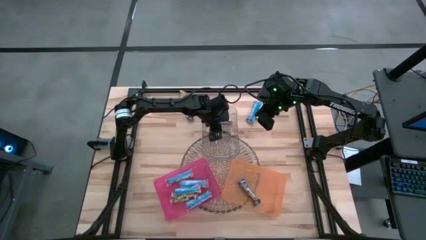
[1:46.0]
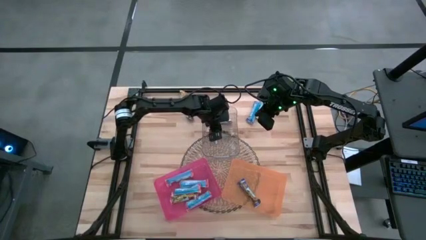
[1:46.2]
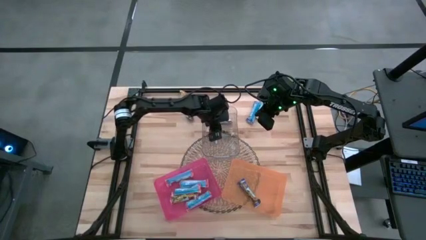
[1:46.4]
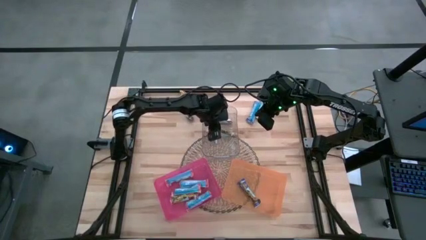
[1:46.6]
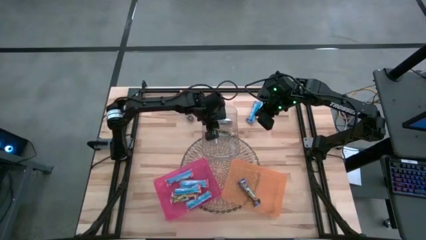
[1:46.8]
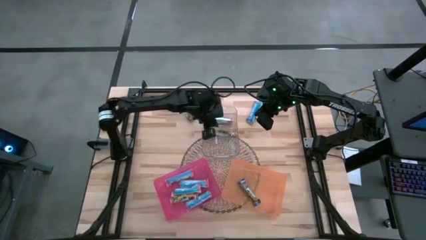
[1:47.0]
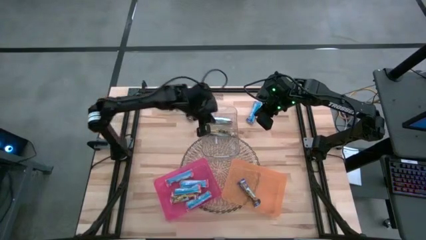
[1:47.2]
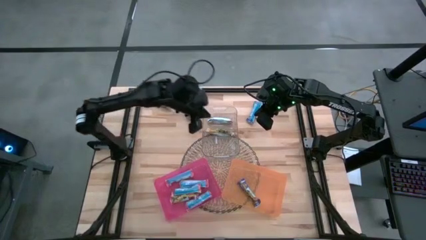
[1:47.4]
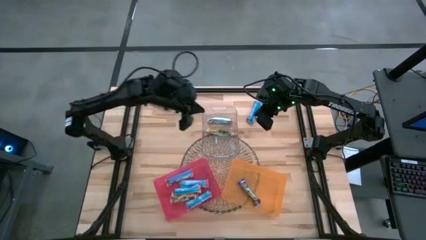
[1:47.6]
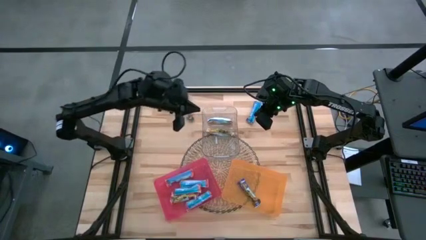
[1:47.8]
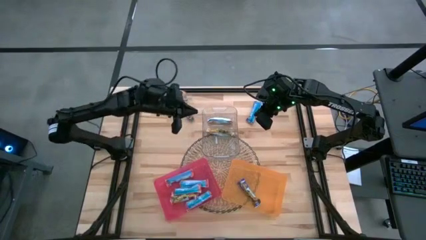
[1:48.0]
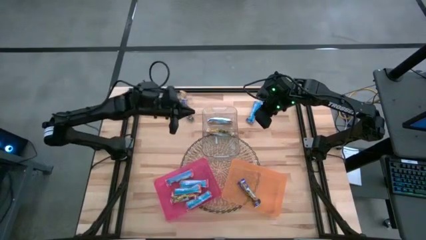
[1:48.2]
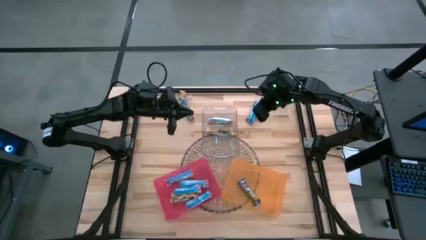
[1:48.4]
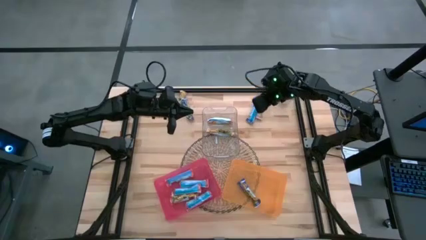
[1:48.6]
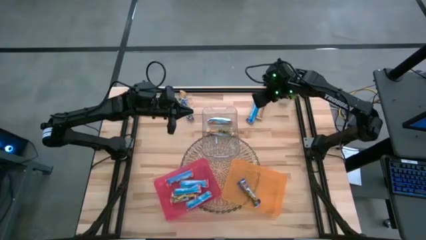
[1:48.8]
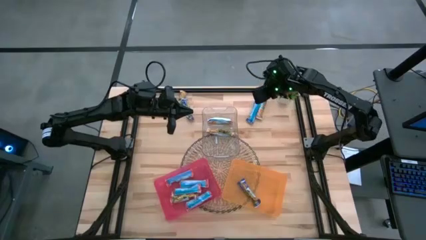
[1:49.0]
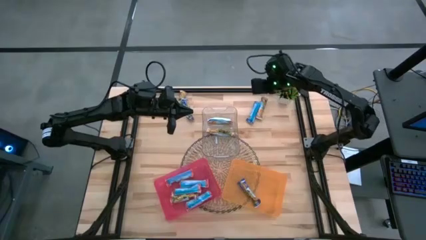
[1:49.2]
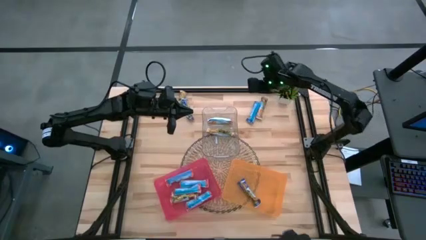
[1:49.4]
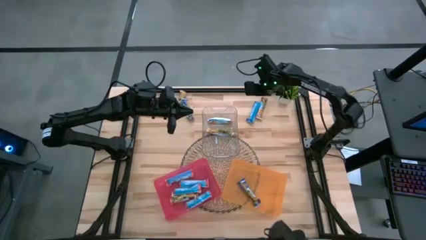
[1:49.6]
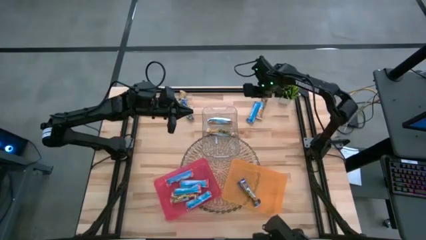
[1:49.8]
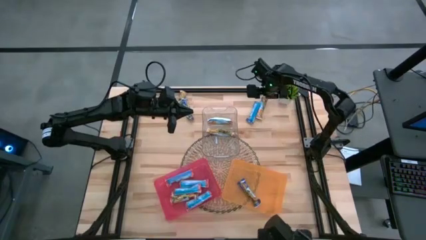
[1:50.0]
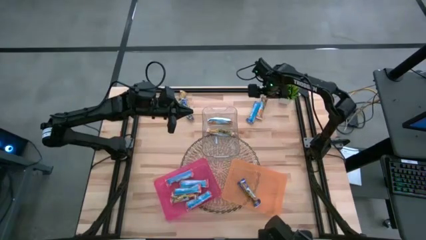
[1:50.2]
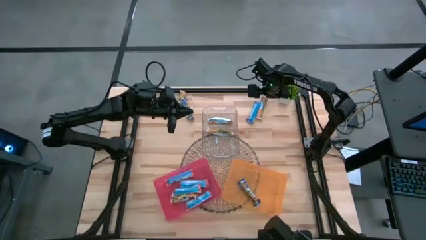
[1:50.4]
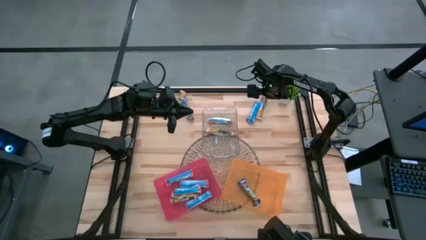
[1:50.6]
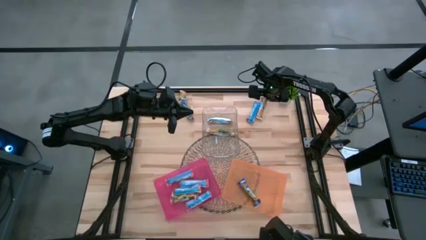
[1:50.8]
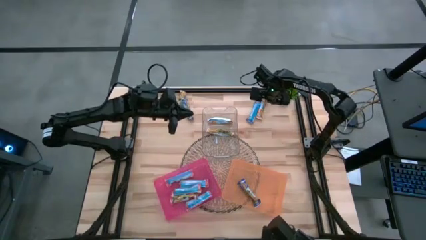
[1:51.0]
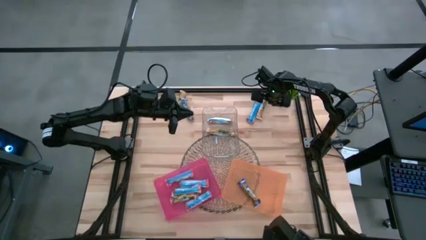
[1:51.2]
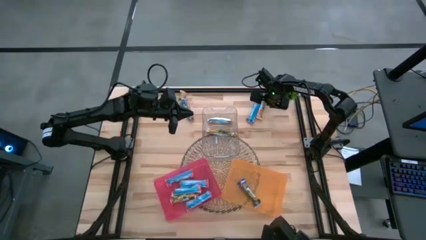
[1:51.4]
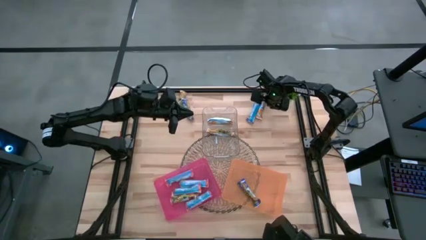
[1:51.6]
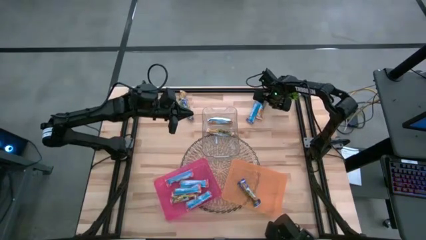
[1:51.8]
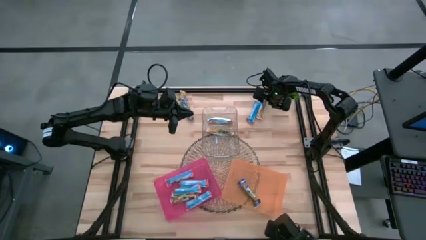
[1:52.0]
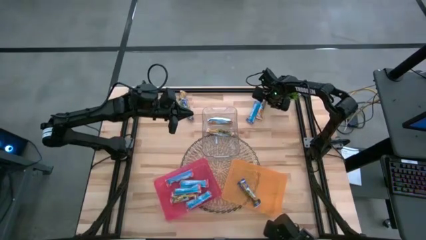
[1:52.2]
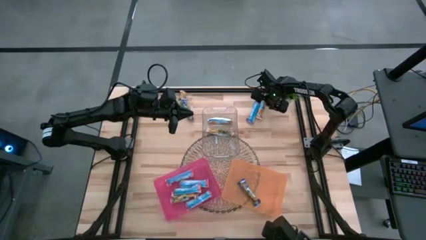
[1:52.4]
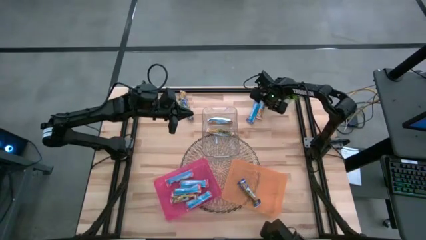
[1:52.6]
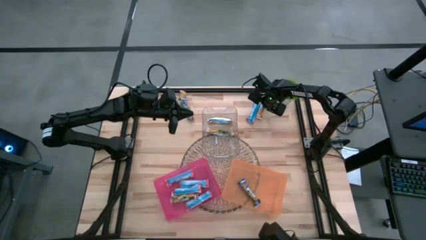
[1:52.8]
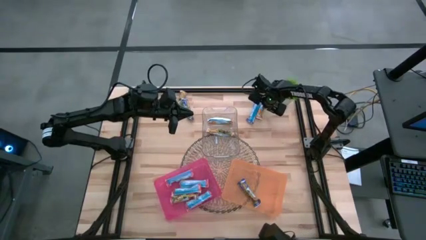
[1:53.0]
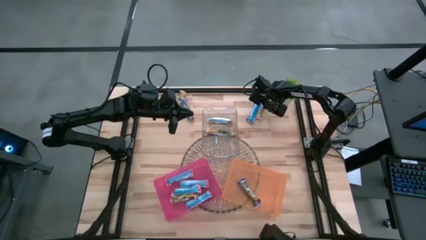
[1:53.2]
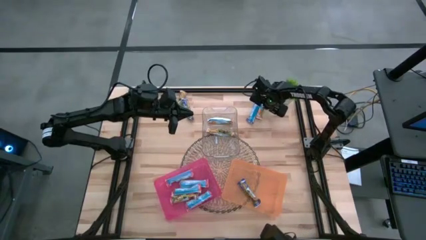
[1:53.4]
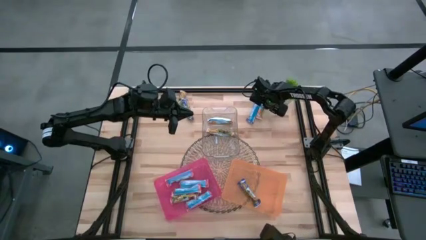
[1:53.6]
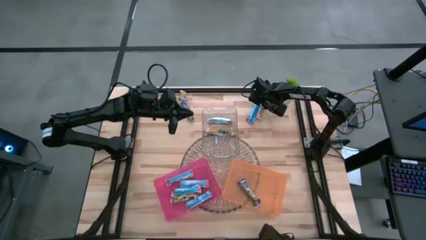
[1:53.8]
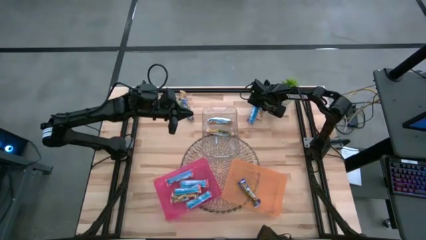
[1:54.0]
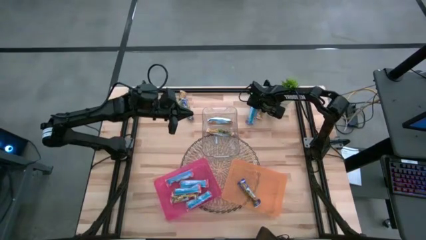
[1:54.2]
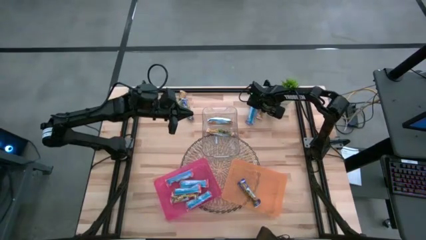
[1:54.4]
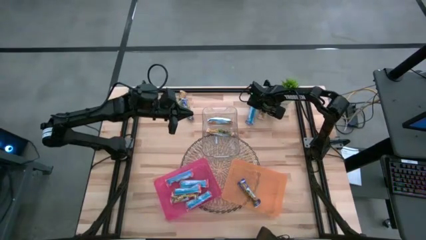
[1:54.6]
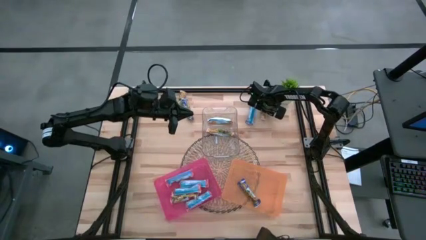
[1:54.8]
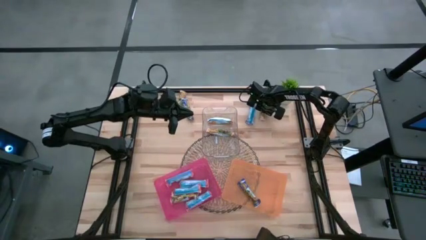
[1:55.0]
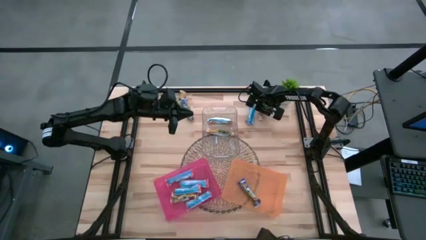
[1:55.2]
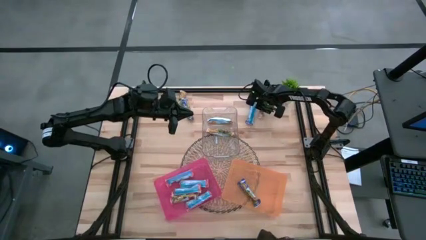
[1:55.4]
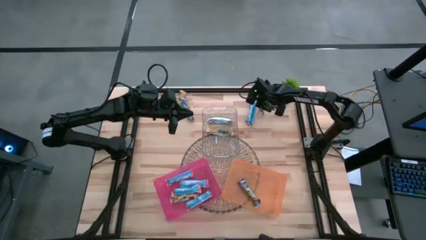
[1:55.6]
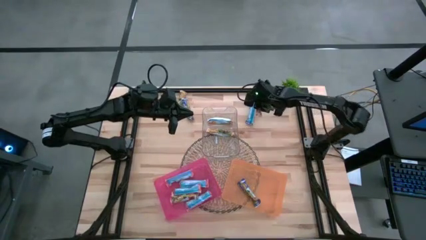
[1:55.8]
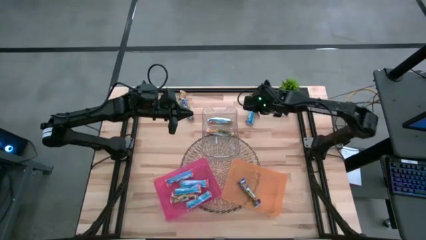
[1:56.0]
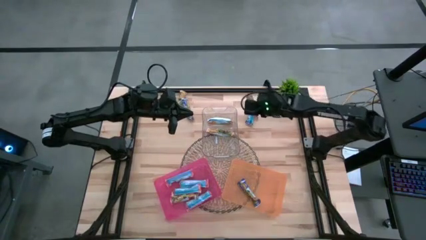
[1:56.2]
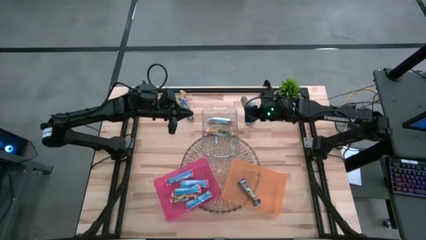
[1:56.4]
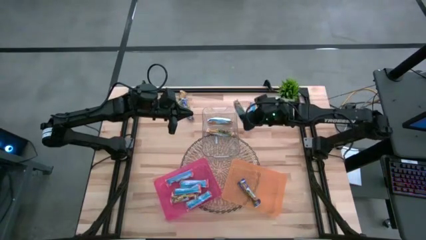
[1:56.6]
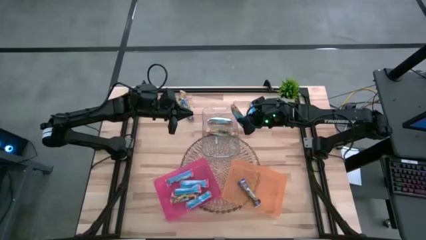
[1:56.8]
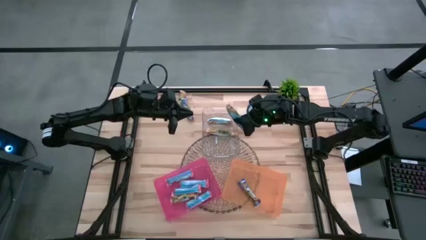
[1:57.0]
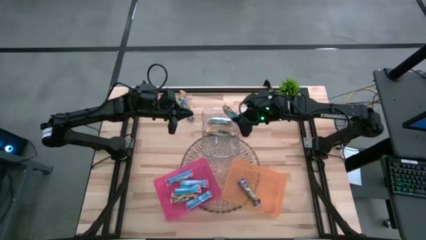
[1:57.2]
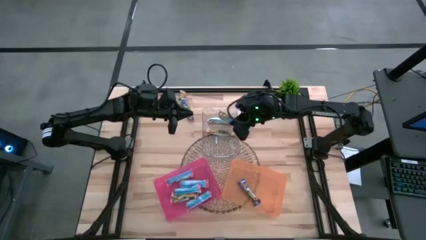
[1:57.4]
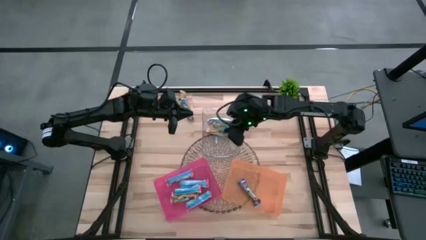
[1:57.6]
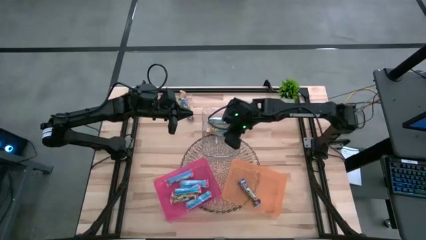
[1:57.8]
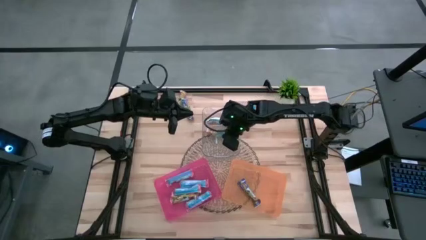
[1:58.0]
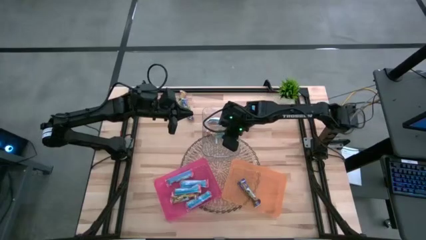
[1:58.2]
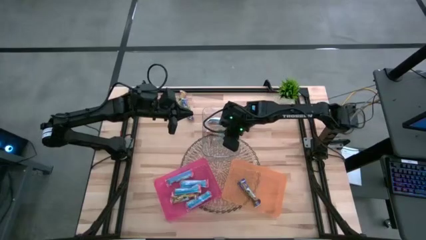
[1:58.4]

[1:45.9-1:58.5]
Task: Pick and place Granola Bars by type
Put the orange granola bar into the transparent bin
